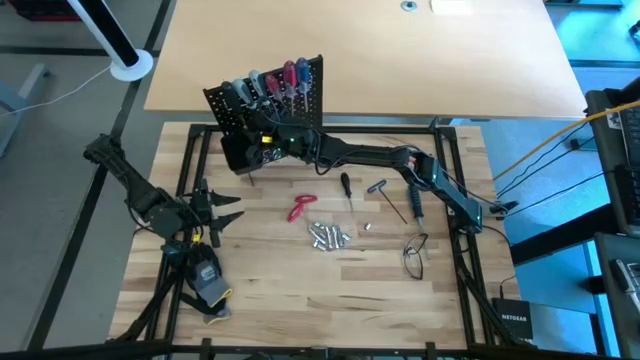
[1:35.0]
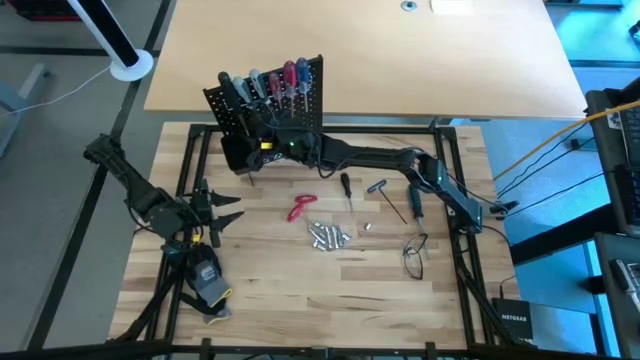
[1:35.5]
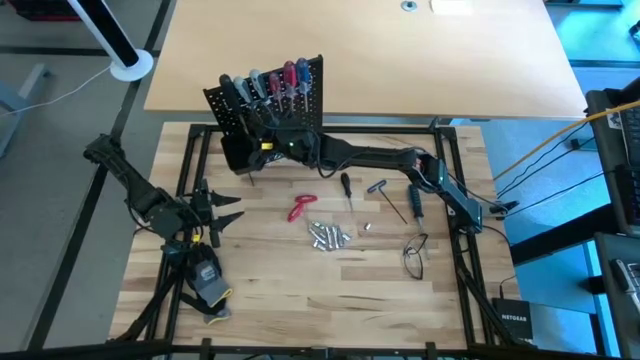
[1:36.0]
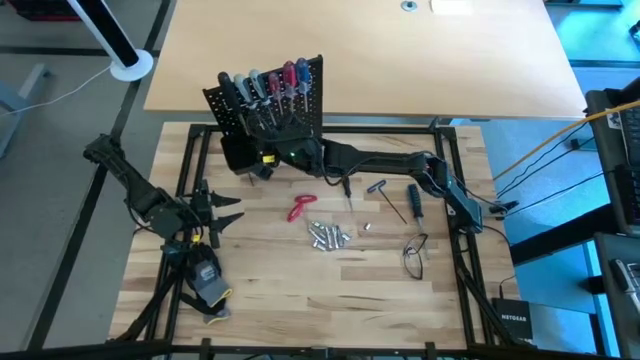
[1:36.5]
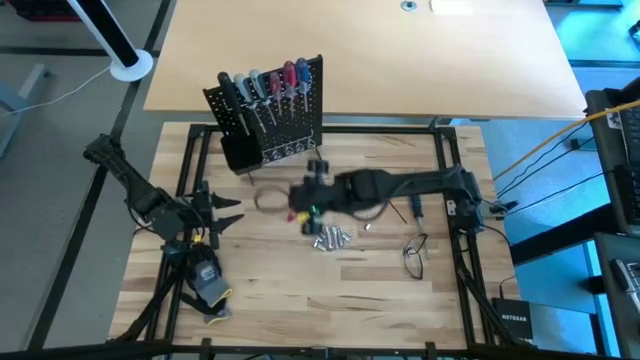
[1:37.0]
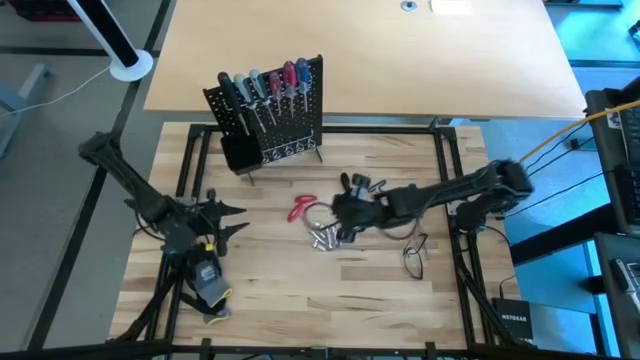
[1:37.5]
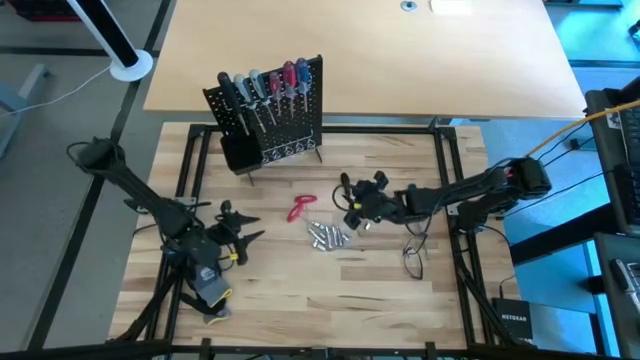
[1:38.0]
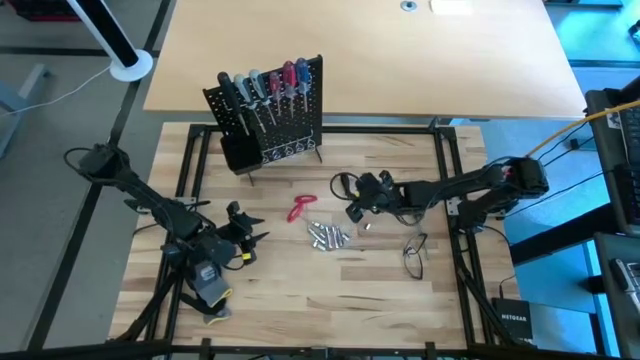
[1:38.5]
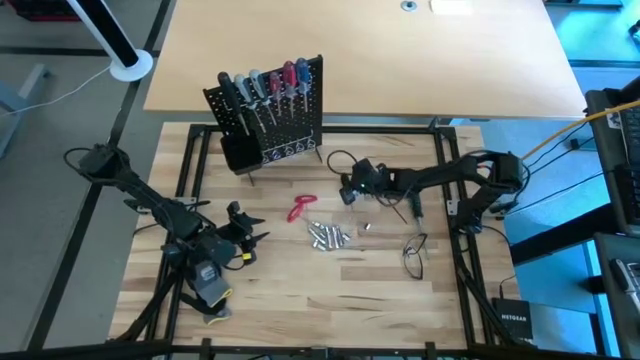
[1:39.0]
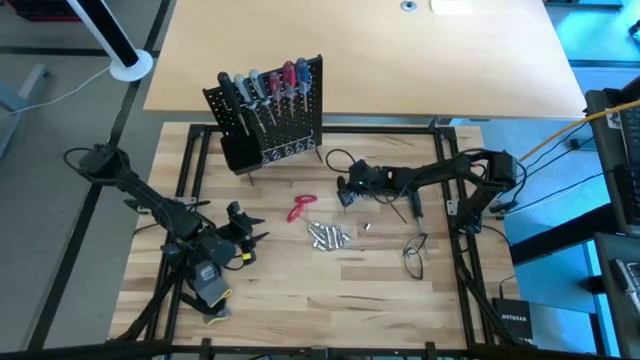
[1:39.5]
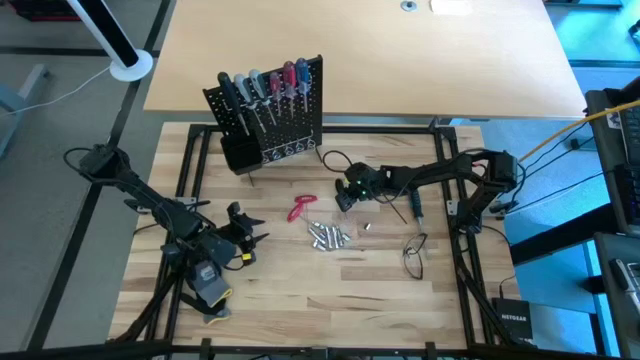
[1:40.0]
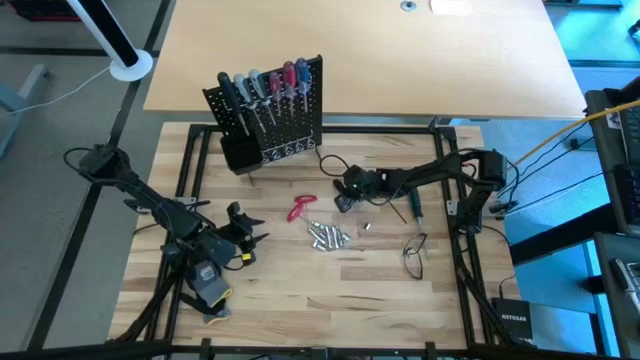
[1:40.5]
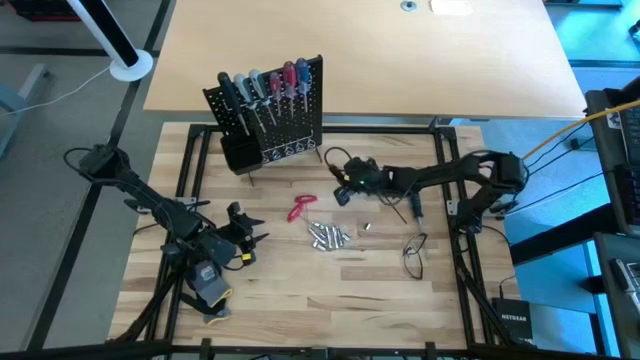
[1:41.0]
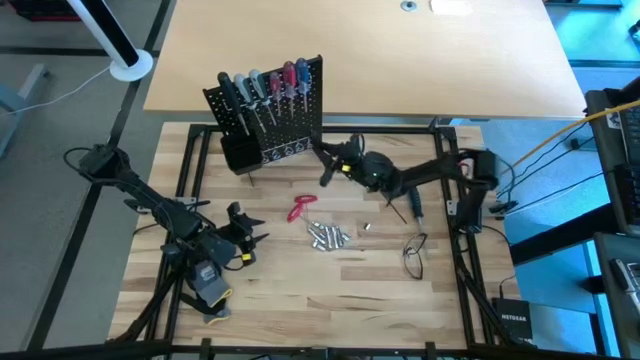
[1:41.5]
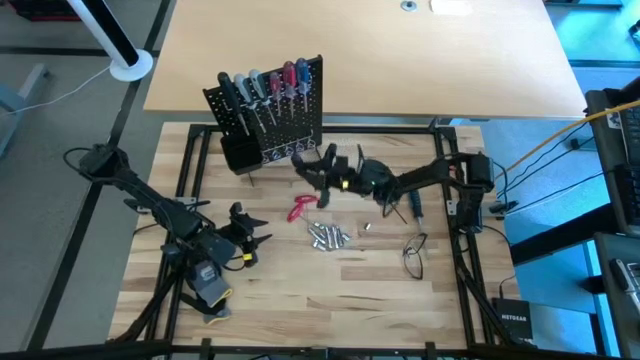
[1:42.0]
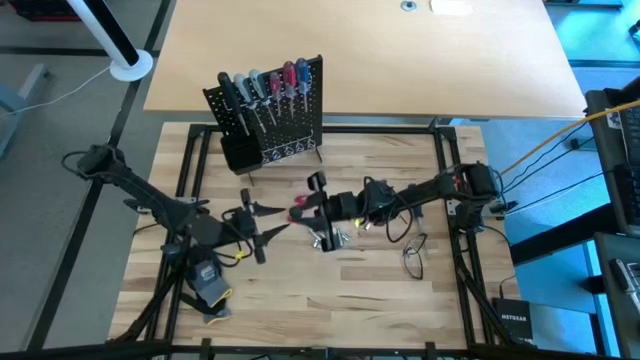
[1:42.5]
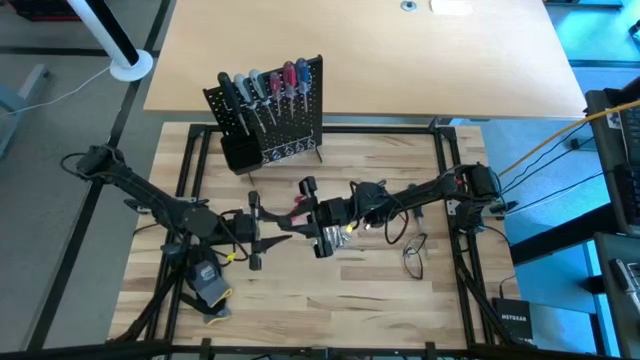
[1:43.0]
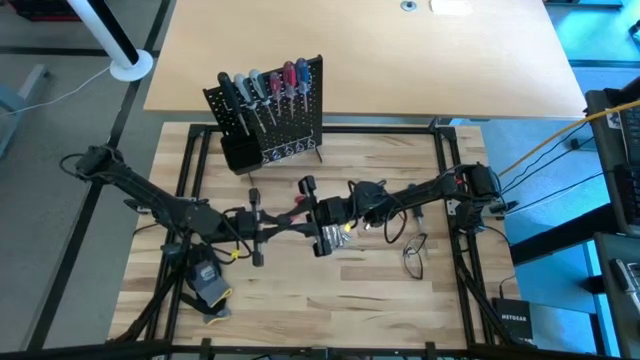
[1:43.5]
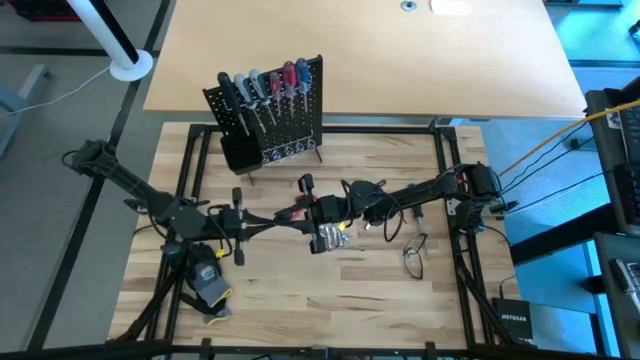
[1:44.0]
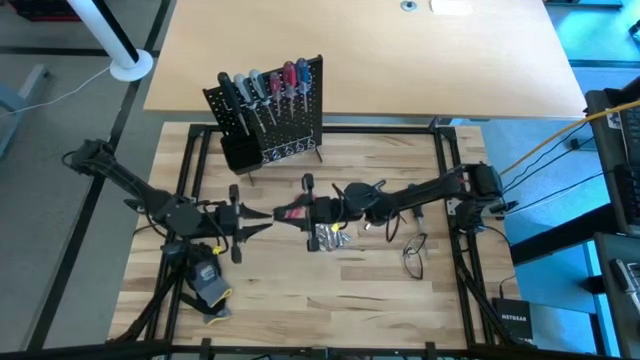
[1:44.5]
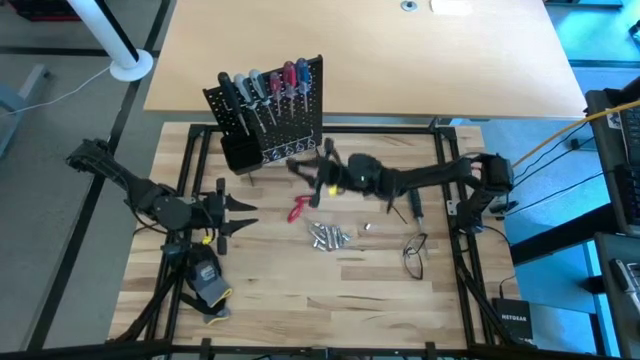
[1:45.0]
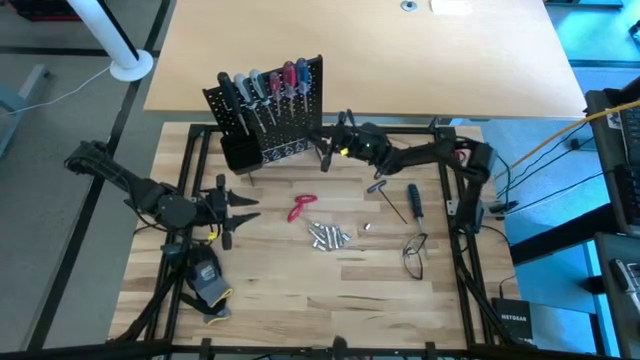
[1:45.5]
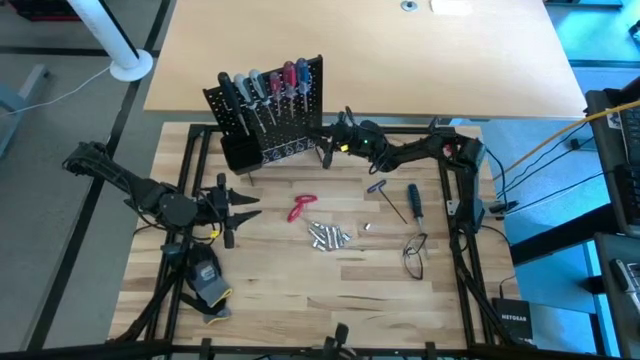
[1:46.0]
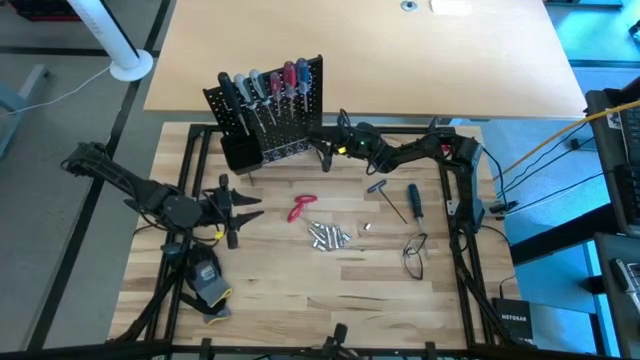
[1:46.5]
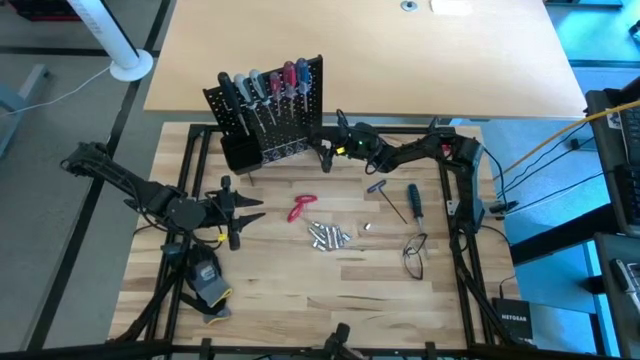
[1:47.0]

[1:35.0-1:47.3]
Task: Hang tools onto peg board
Hang the black screwdriver onto the peg board

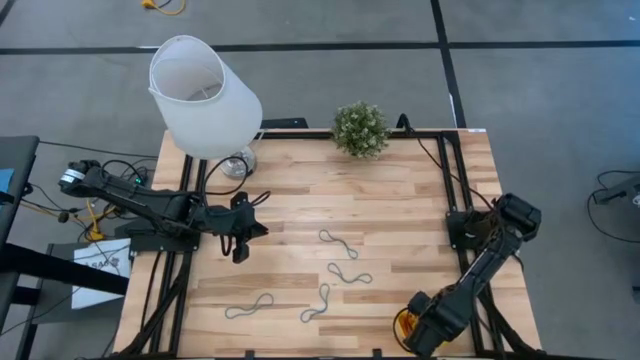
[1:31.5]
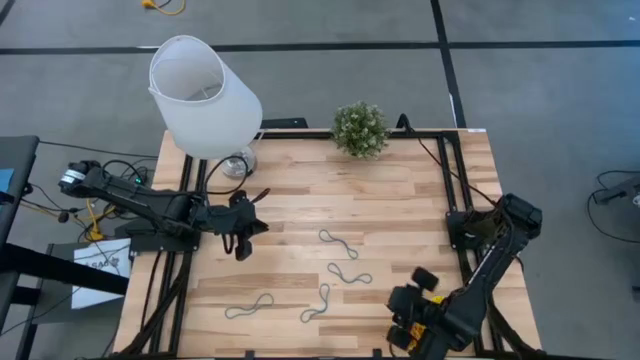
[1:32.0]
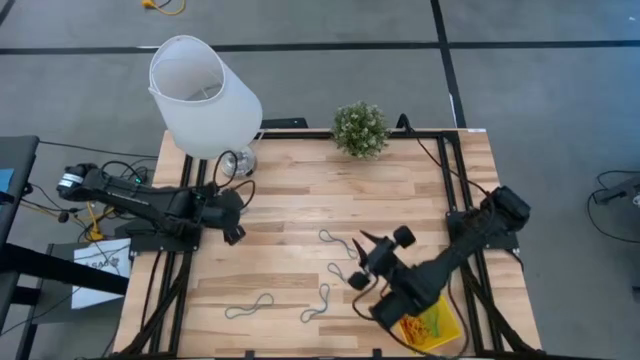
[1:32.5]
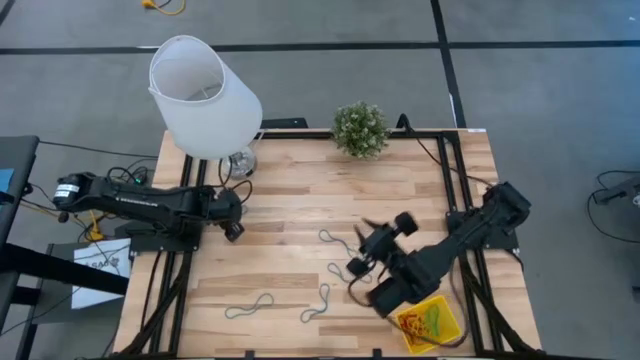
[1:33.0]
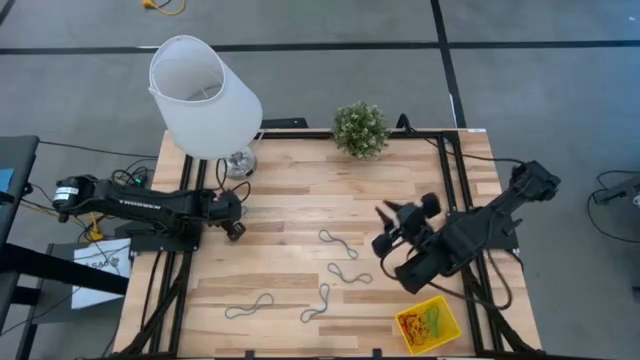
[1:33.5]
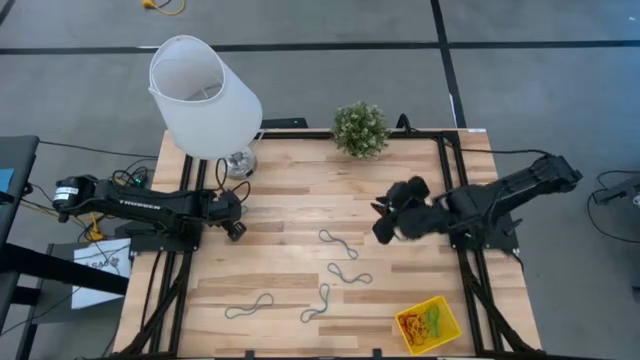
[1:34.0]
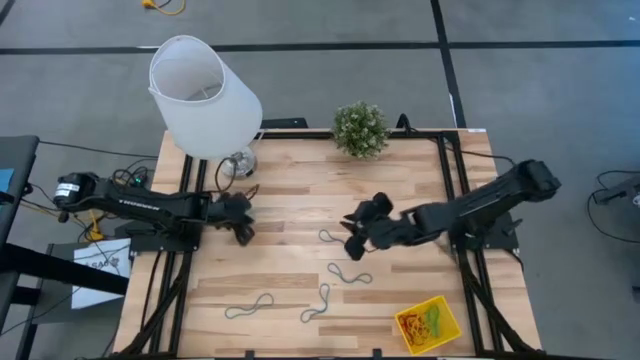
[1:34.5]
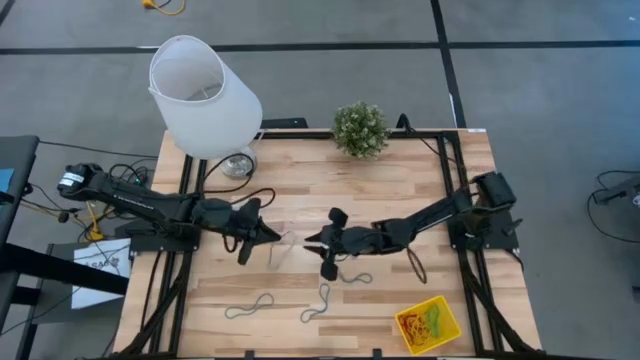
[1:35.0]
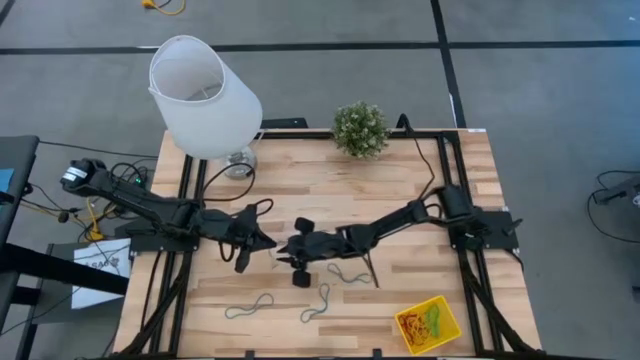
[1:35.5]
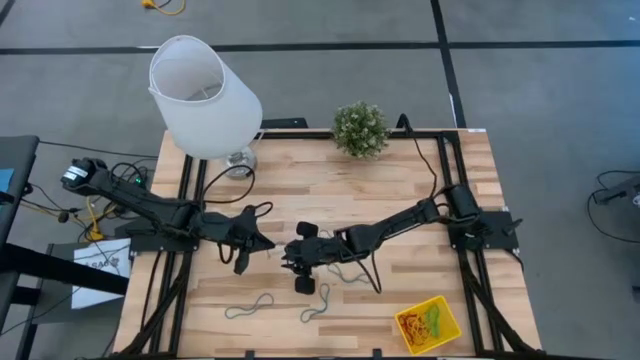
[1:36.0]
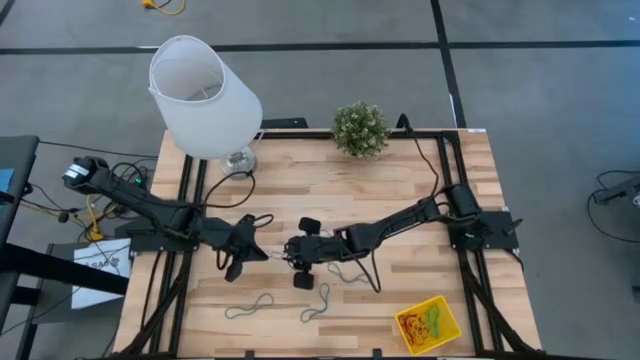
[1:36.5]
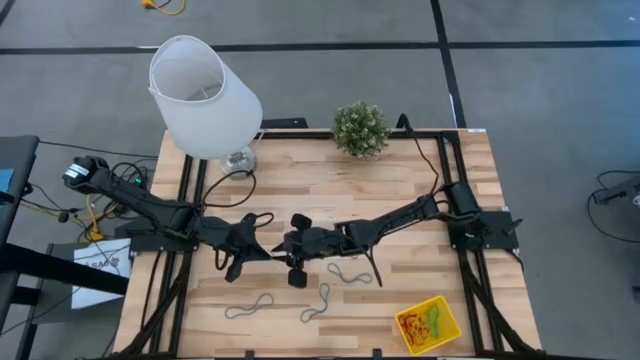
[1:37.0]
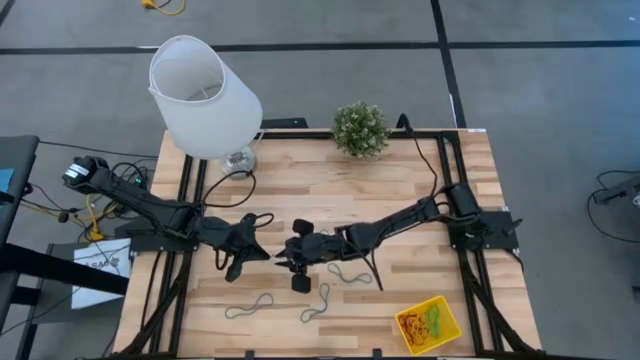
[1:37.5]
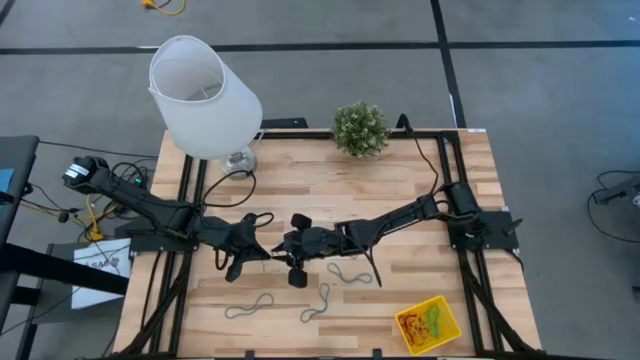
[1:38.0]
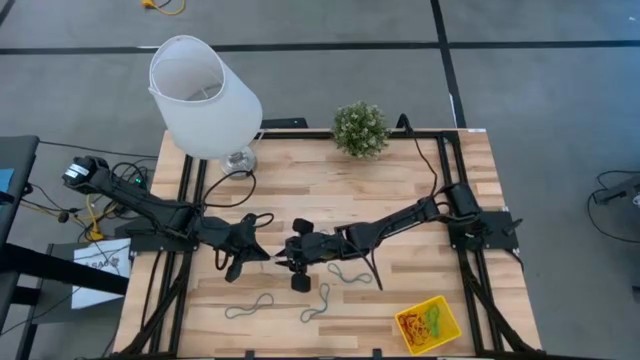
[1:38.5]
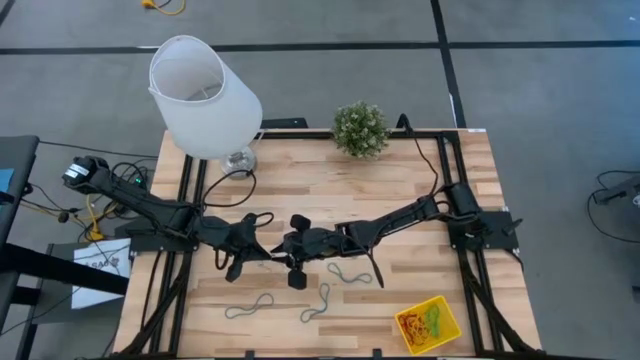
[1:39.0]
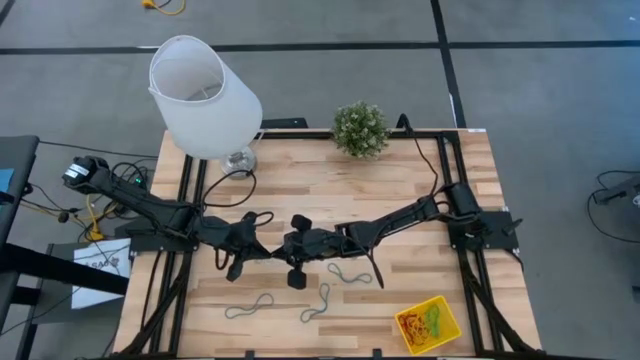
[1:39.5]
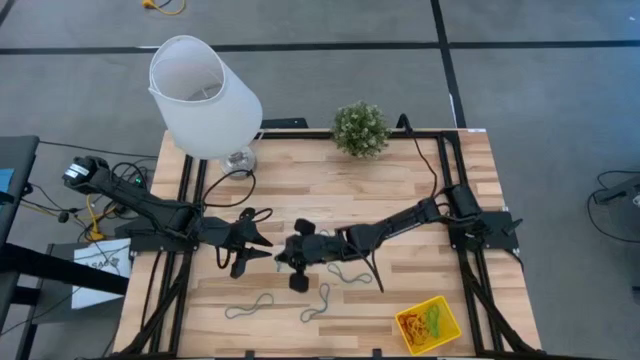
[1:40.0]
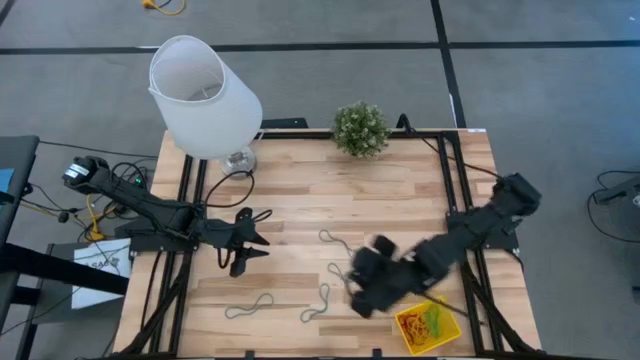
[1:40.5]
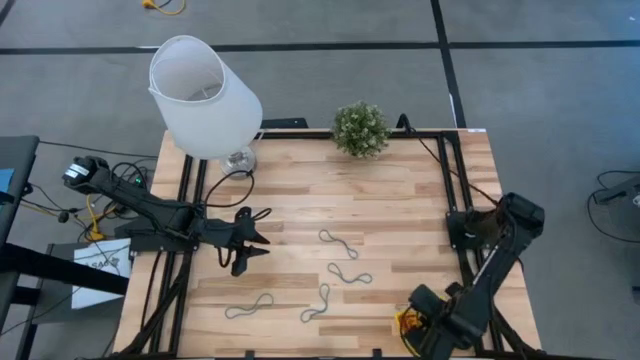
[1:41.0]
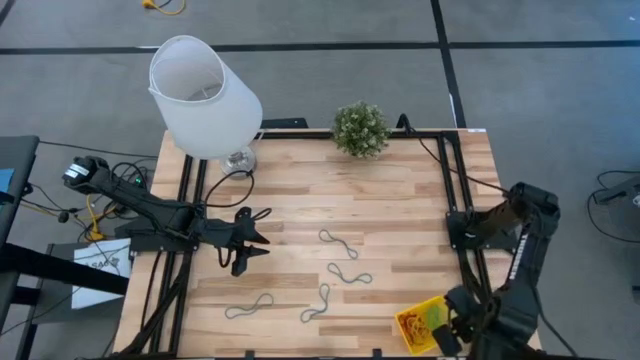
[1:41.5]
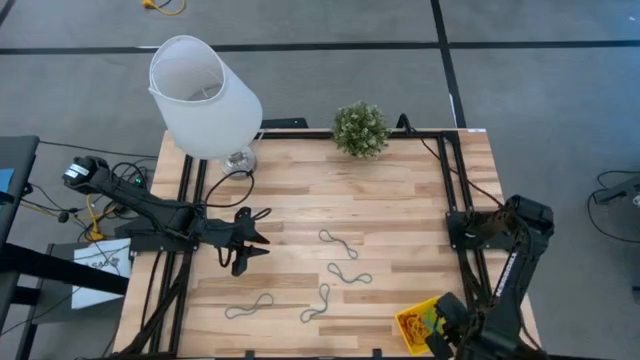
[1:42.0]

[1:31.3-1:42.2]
Task: Pick and place rubber bands into bin
Put the blue rubber band into the yellow basket
